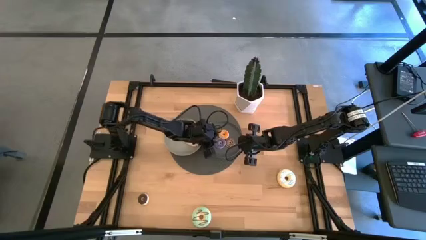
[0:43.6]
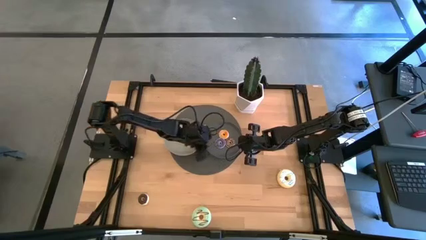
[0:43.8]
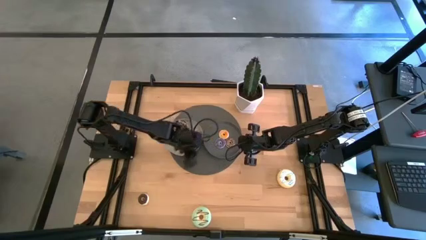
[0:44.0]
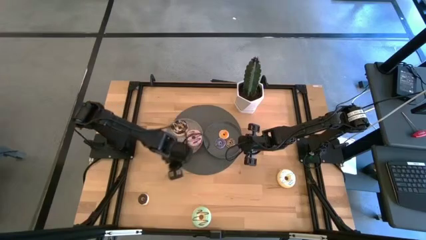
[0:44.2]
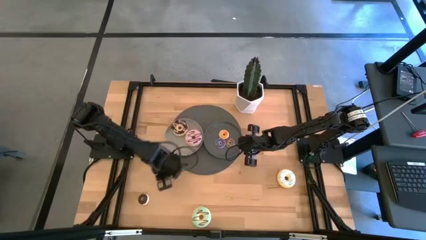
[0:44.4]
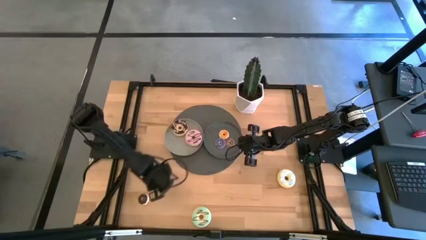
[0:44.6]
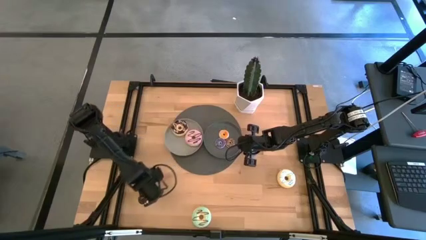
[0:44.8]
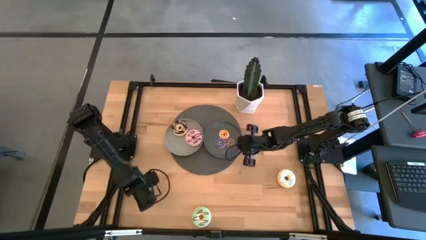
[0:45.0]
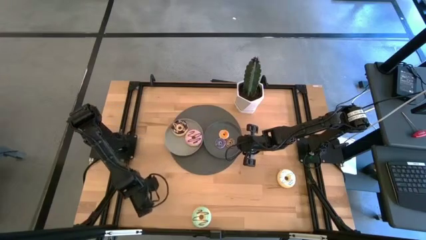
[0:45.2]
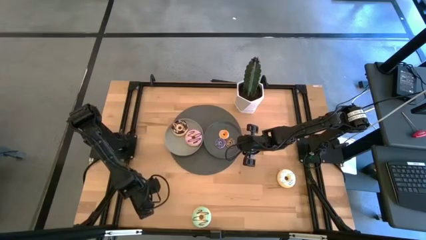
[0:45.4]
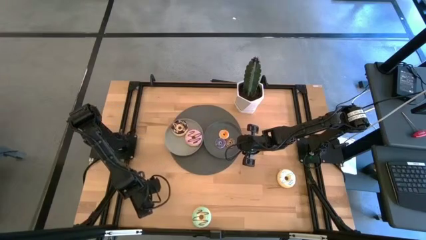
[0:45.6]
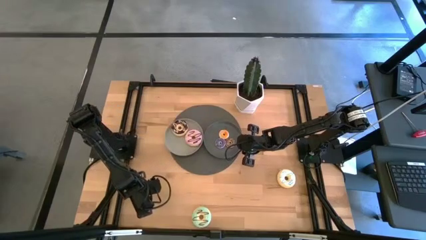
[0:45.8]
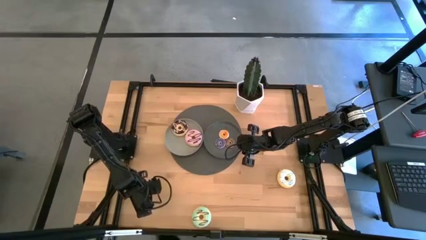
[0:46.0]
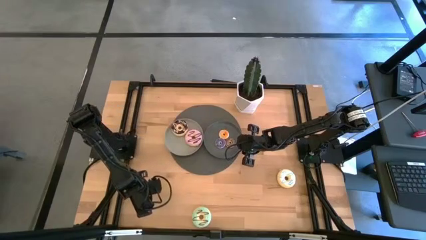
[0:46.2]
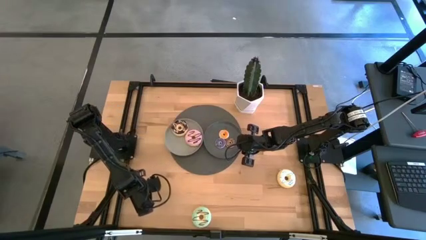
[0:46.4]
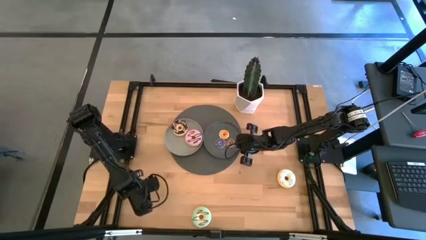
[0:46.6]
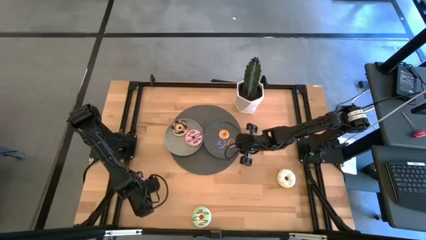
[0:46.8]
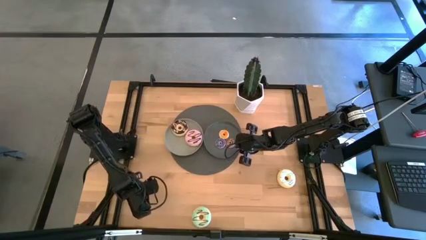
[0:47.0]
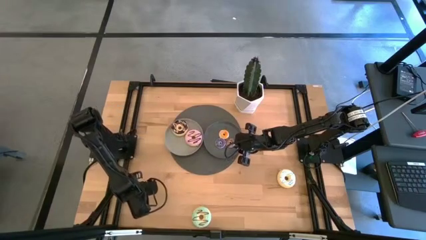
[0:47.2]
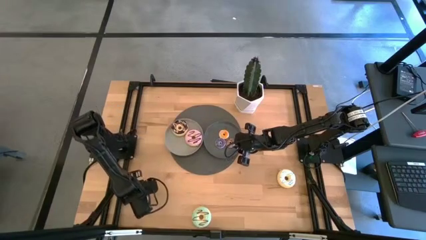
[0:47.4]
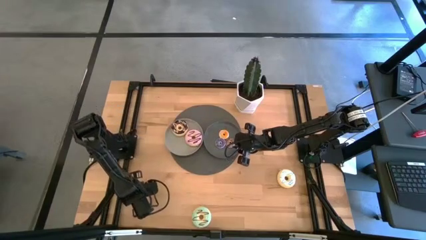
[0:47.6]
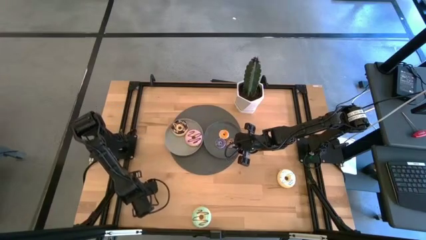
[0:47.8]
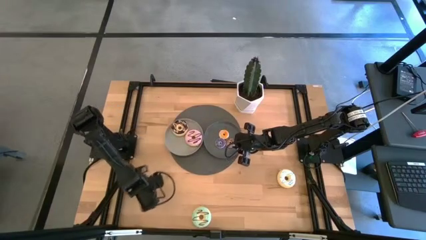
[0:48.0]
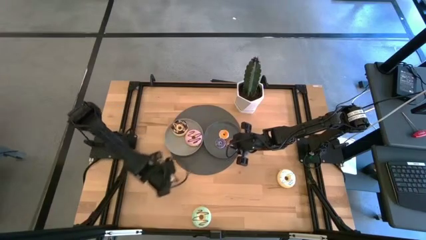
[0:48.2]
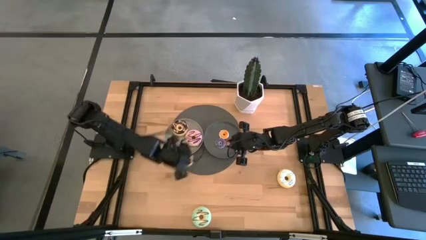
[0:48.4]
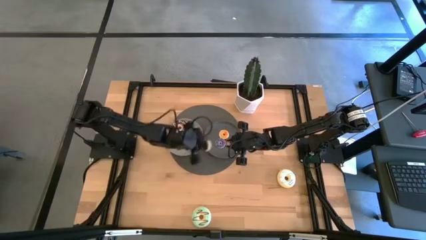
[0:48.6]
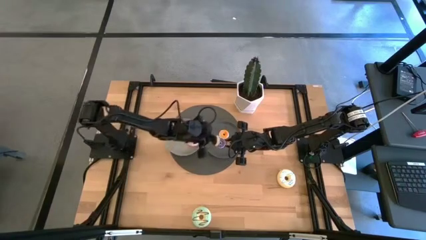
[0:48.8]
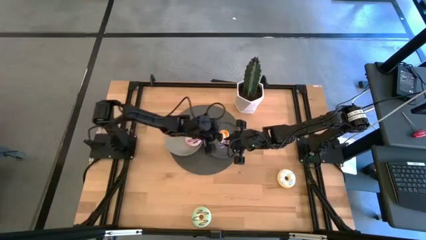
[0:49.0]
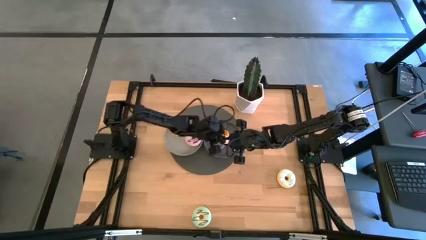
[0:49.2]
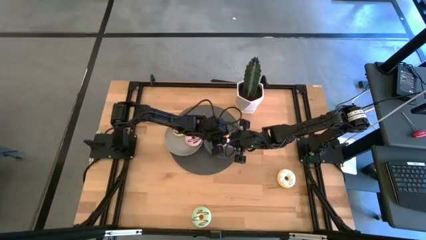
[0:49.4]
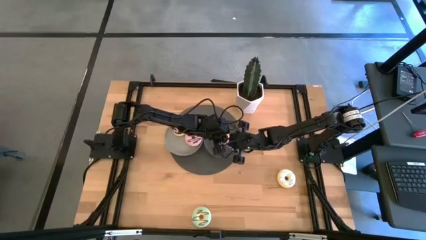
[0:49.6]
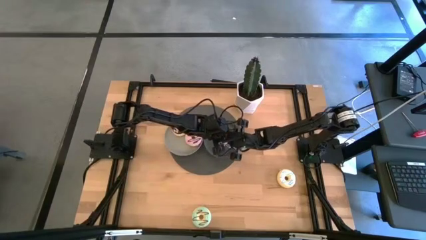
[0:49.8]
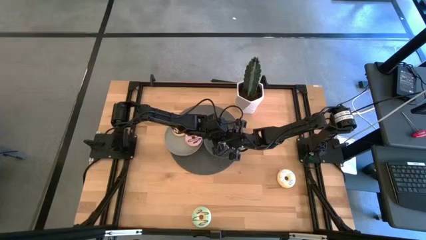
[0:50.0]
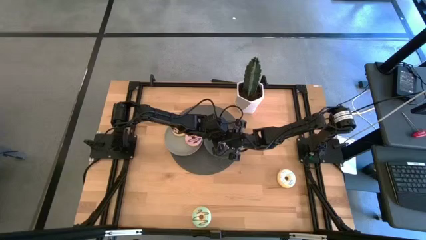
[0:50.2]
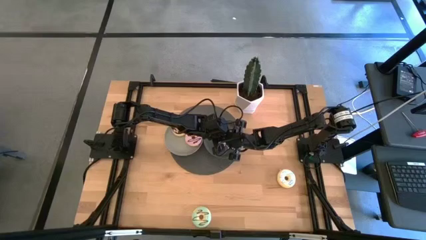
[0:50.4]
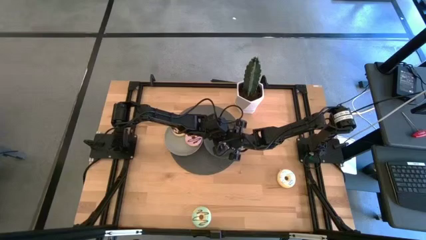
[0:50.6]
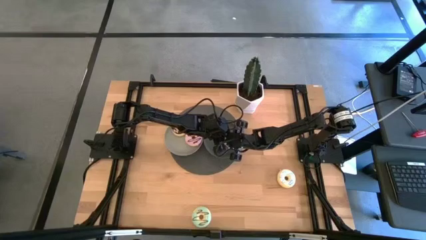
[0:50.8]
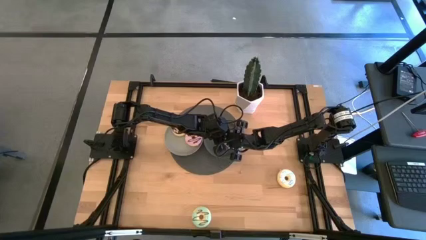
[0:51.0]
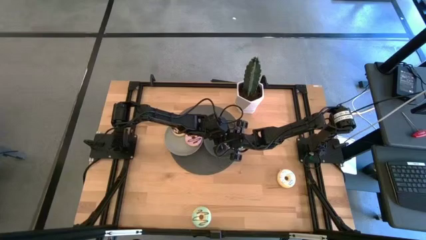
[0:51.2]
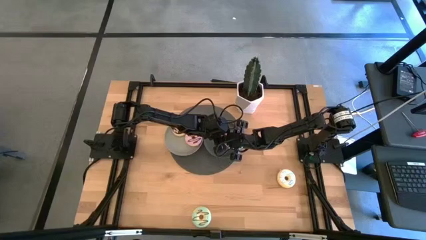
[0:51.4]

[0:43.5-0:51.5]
Task: Pick & Place donuts
Put the small dark brown donut on the dark gray plate

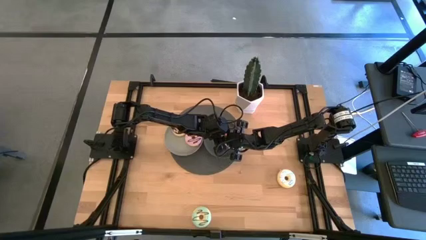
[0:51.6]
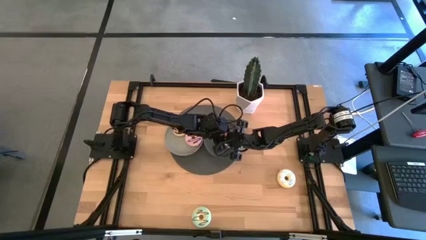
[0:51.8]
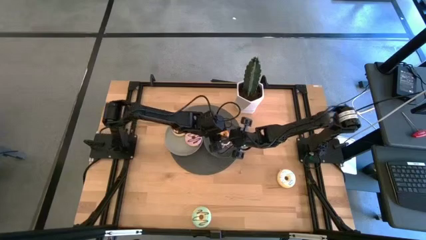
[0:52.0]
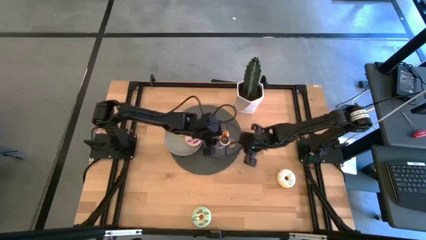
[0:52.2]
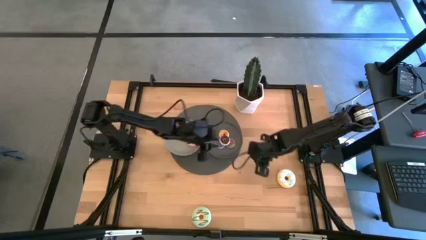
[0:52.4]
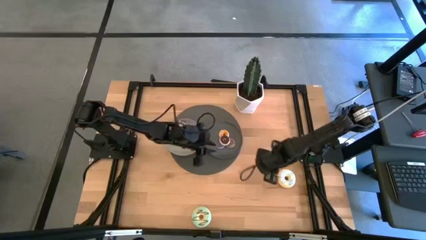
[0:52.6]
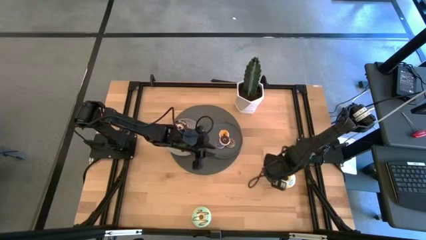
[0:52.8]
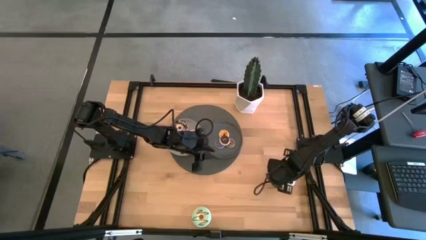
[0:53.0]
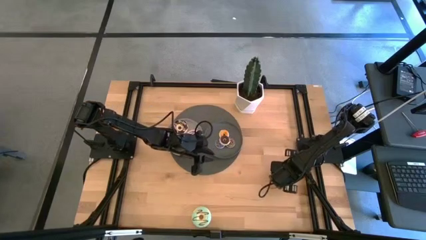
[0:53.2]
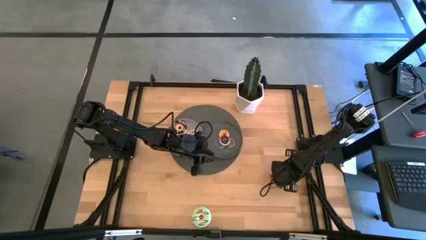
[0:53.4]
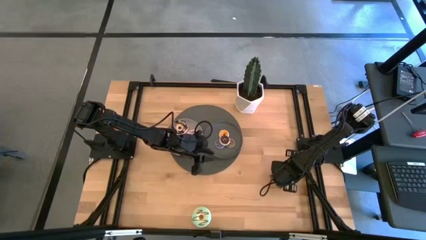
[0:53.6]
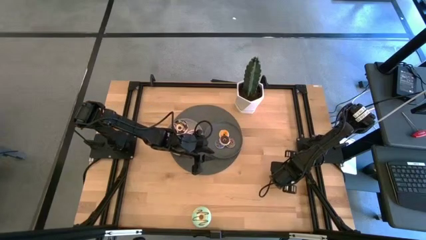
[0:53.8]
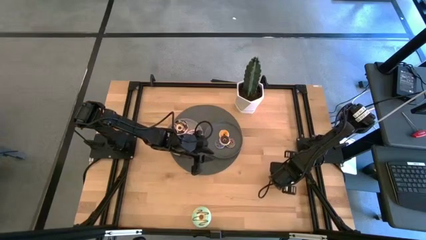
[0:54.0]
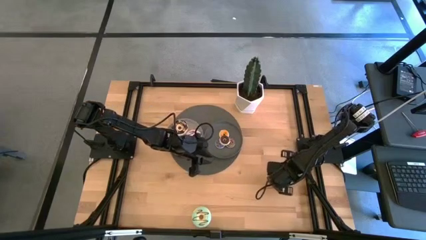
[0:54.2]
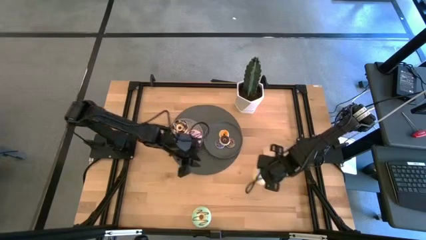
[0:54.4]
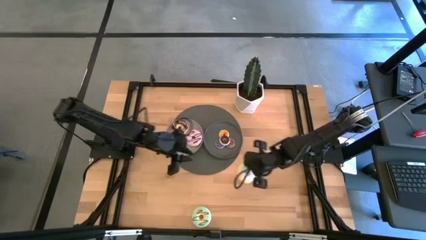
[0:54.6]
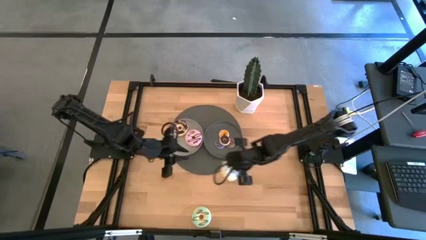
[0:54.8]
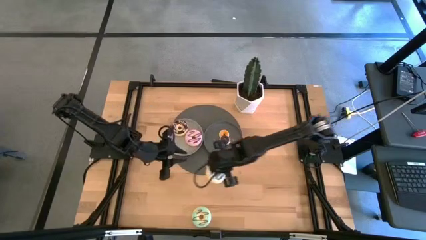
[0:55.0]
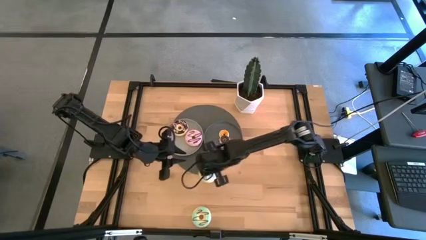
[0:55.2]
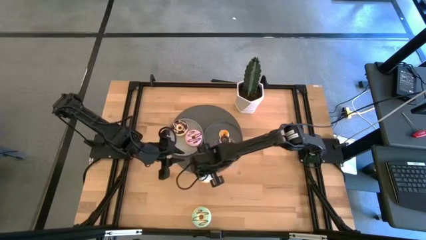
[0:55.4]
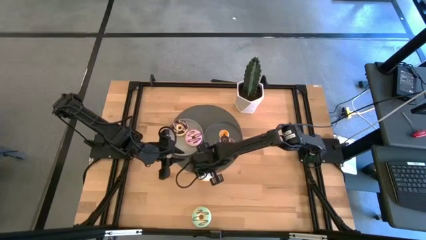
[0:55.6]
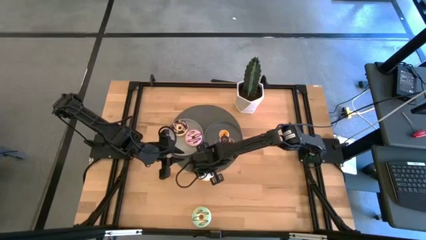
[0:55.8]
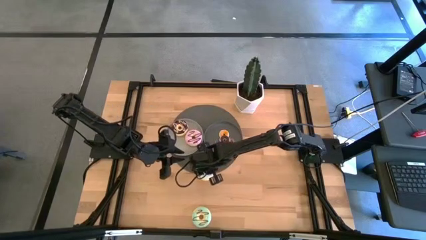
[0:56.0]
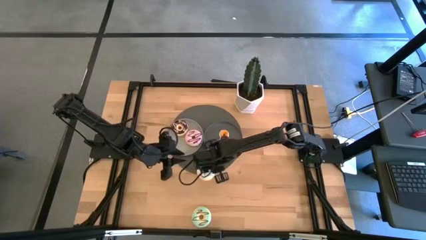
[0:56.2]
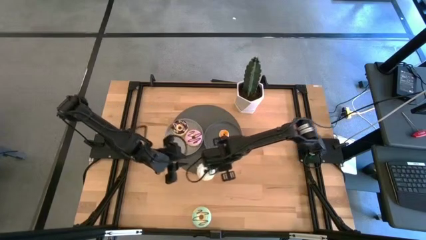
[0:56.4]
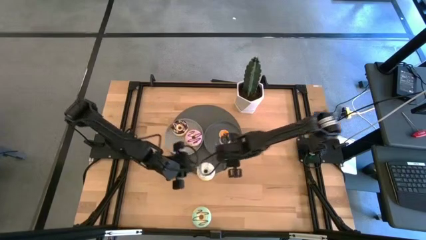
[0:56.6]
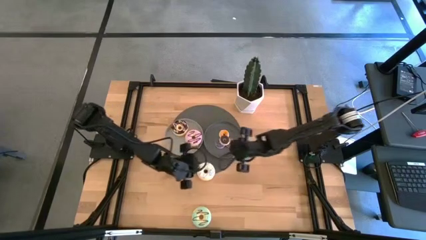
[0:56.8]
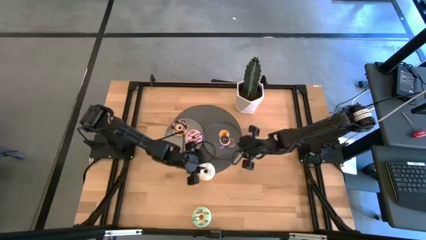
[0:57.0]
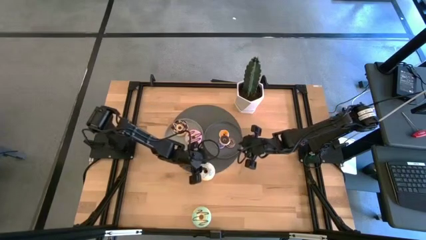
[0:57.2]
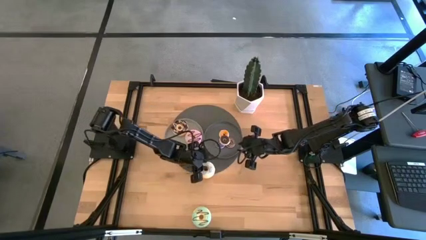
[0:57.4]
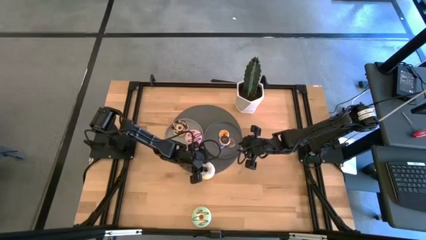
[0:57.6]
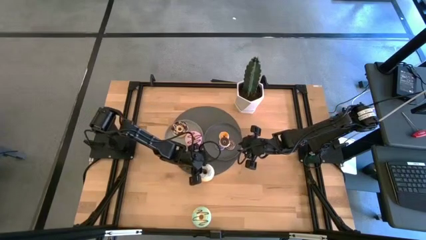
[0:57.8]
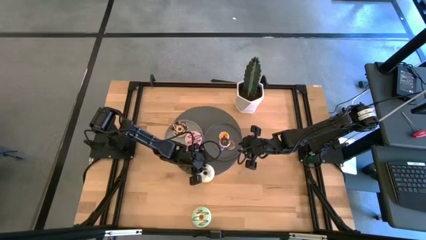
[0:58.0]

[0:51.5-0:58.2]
Put the large white donut on the light gray plate

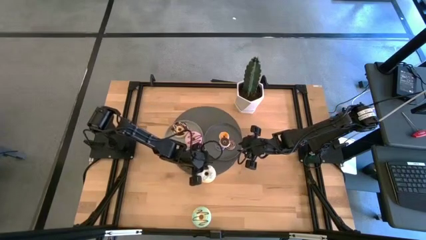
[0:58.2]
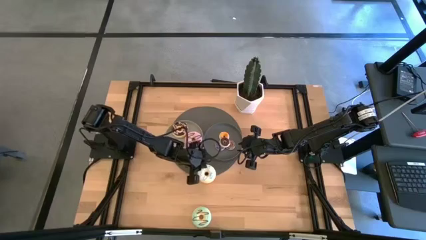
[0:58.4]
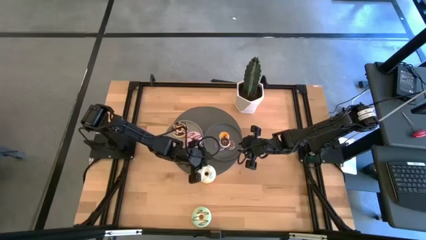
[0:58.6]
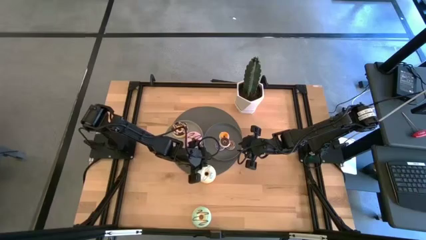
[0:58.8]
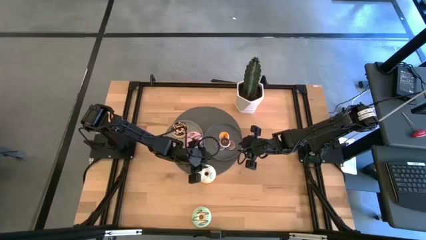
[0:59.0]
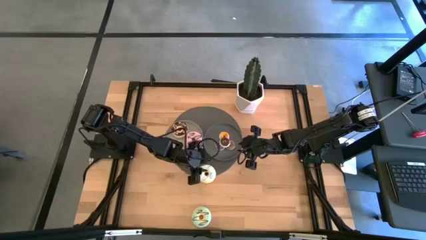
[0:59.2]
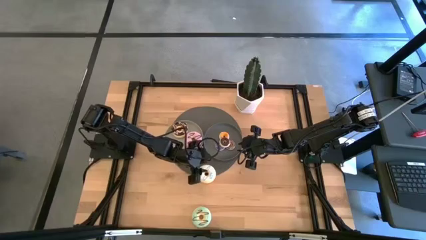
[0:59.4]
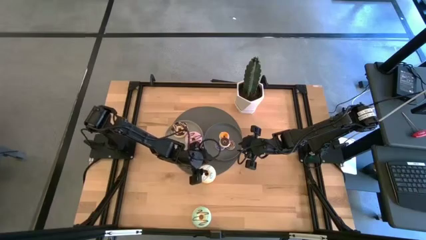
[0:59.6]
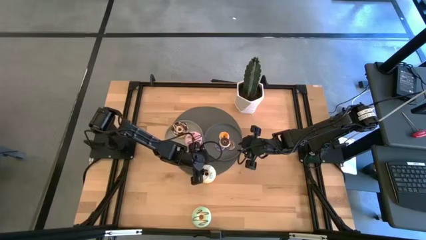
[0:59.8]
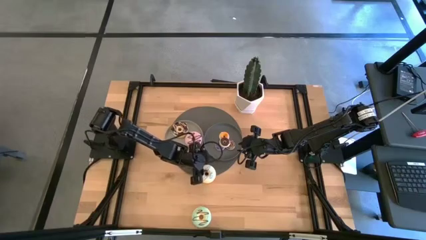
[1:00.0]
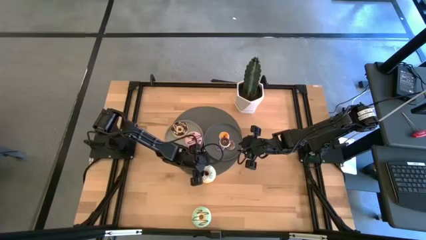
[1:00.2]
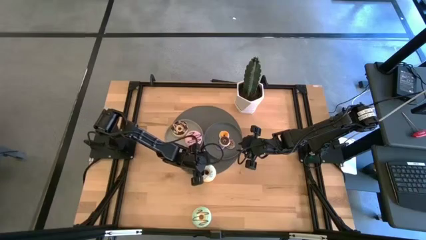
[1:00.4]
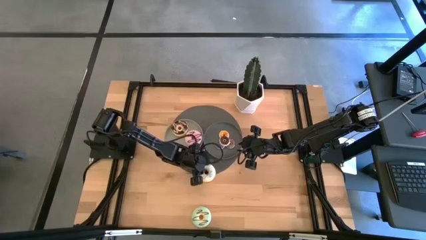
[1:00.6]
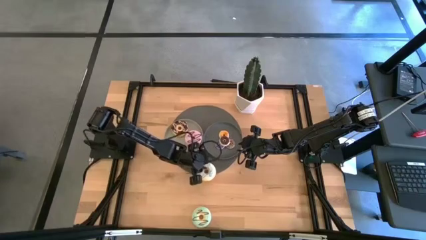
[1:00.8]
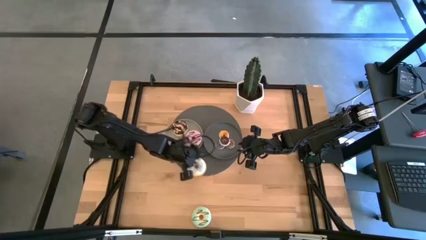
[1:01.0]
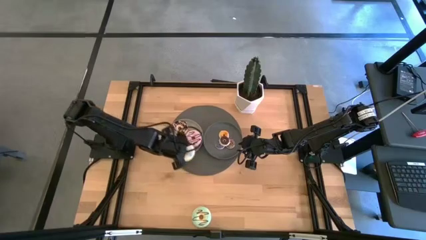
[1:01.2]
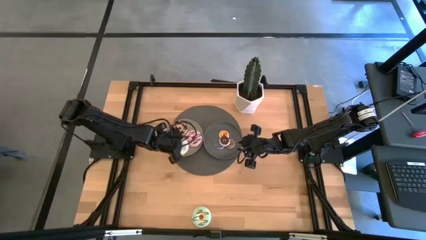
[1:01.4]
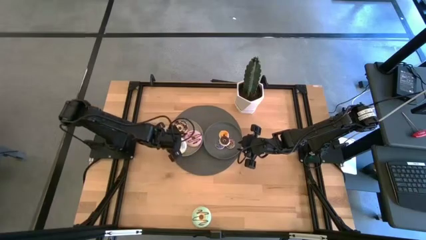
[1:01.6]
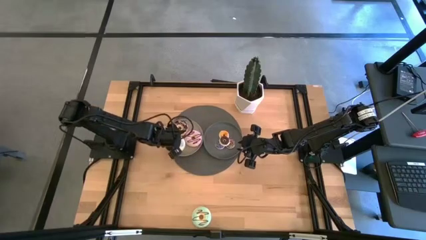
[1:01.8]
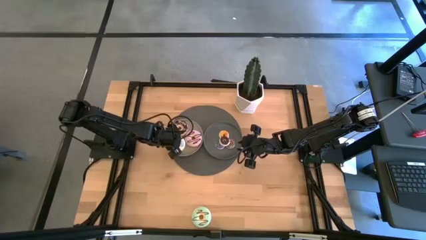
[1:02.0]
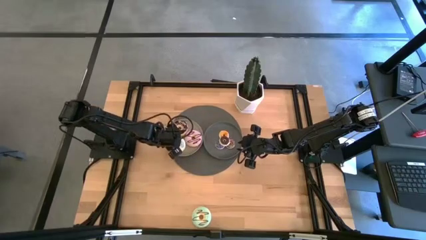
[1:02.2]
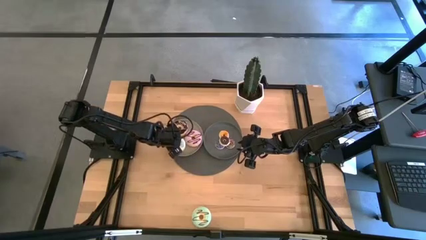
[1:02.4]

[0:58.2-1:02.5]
Put the large white donut on the light gray plate
